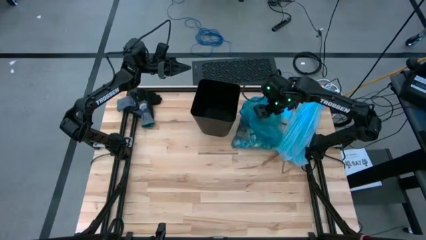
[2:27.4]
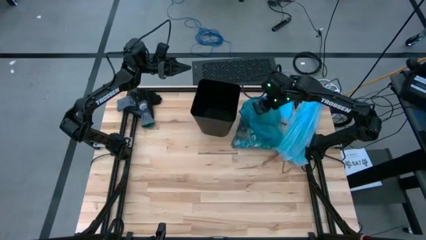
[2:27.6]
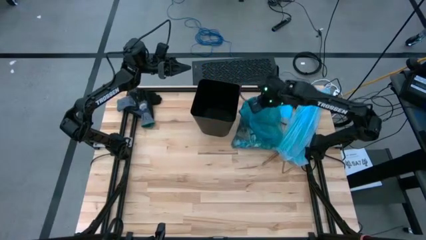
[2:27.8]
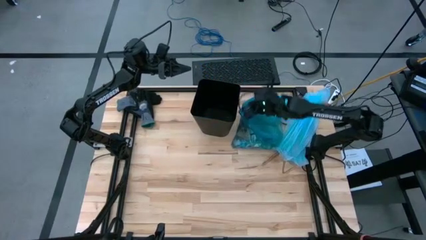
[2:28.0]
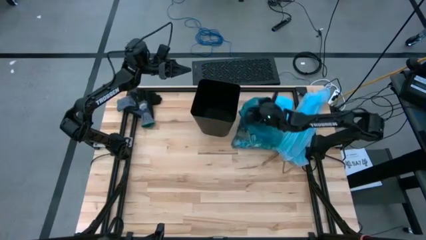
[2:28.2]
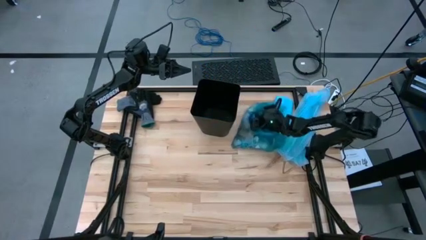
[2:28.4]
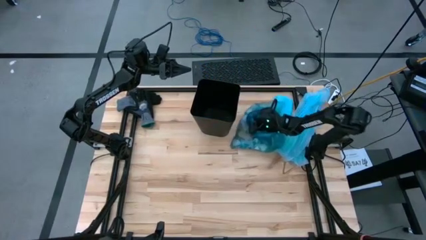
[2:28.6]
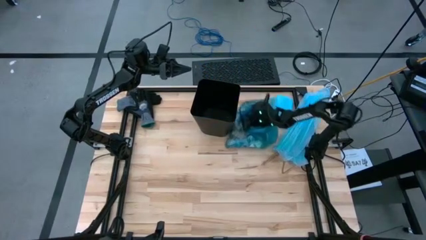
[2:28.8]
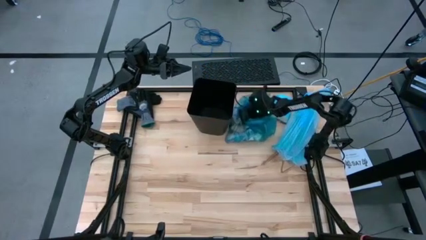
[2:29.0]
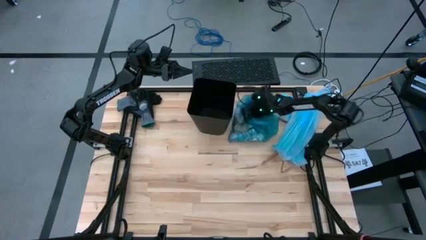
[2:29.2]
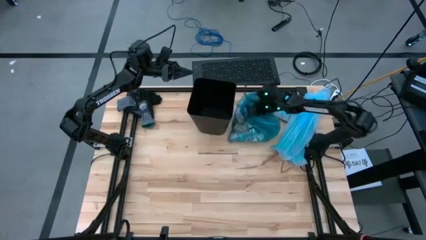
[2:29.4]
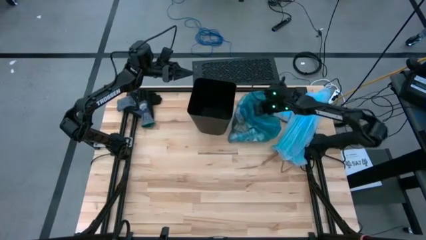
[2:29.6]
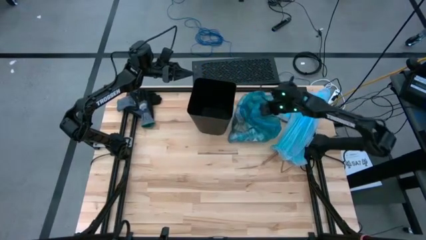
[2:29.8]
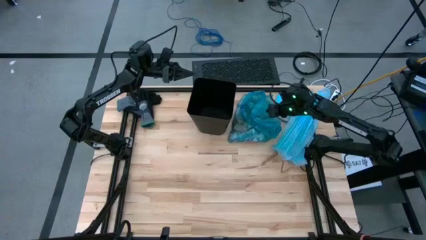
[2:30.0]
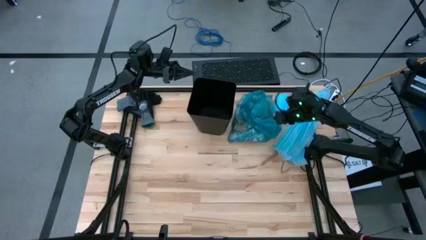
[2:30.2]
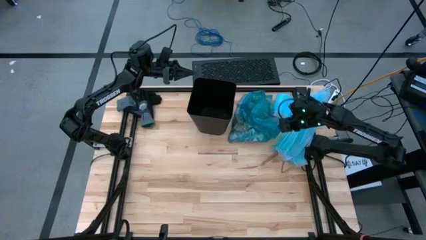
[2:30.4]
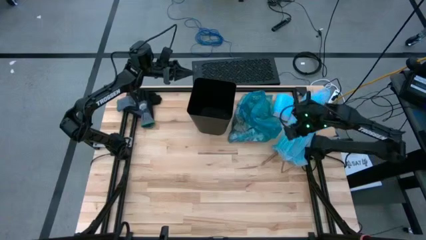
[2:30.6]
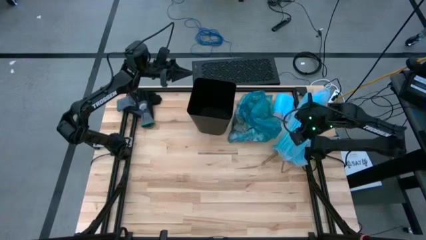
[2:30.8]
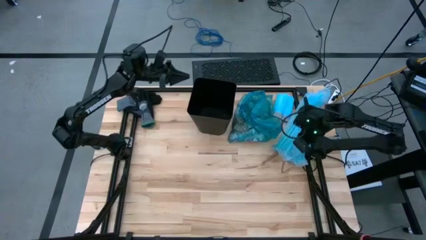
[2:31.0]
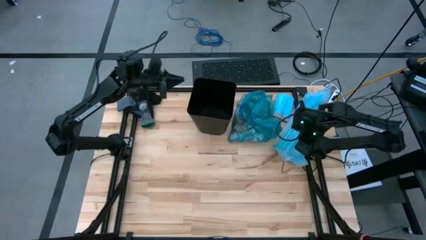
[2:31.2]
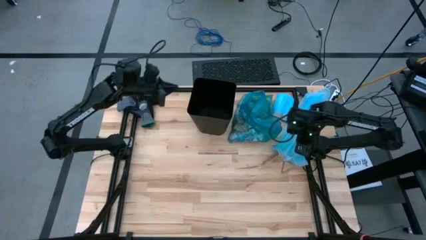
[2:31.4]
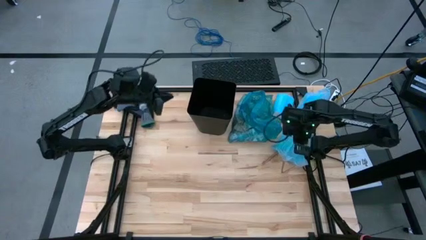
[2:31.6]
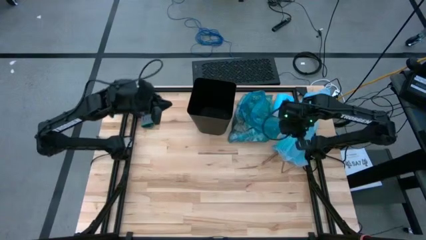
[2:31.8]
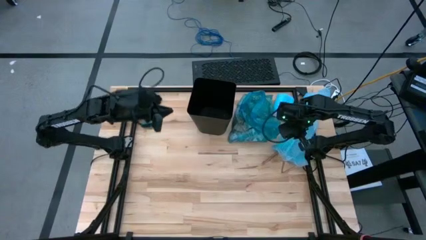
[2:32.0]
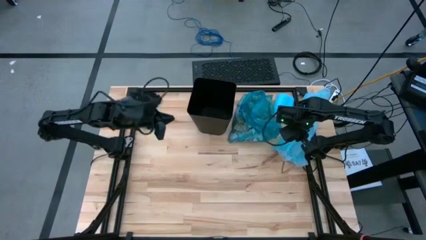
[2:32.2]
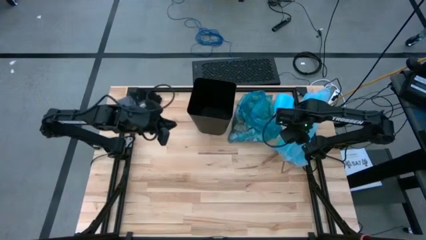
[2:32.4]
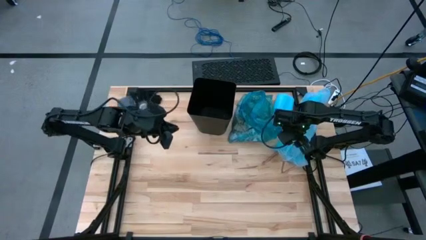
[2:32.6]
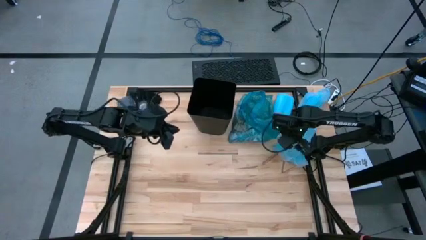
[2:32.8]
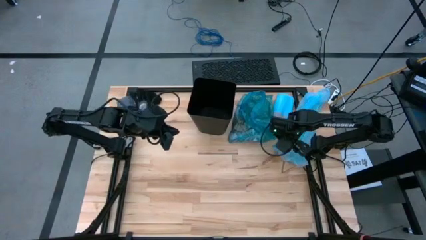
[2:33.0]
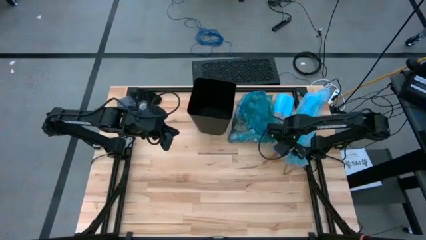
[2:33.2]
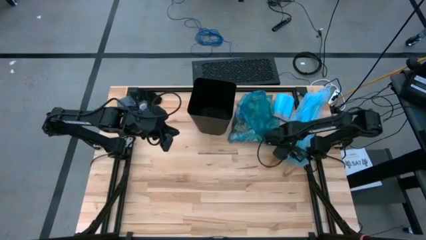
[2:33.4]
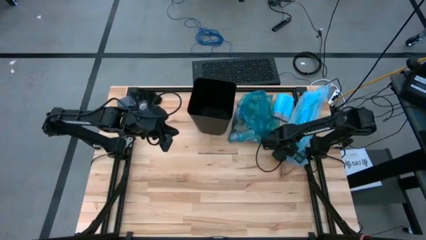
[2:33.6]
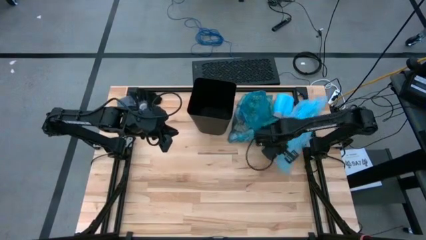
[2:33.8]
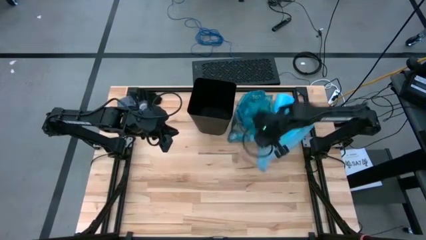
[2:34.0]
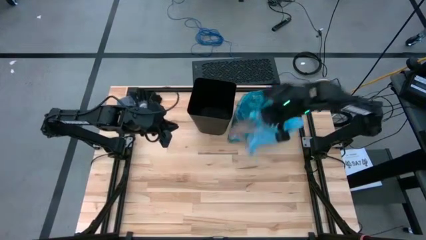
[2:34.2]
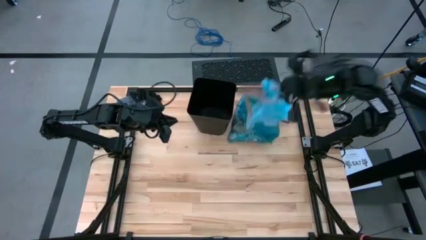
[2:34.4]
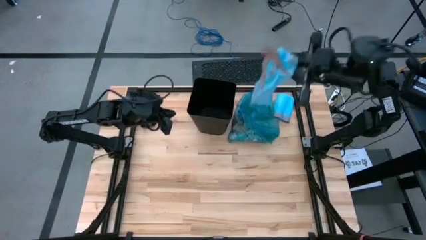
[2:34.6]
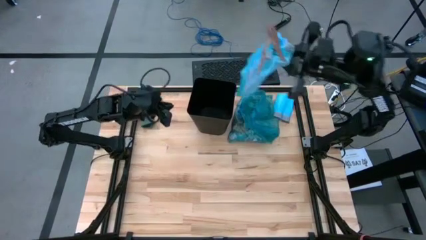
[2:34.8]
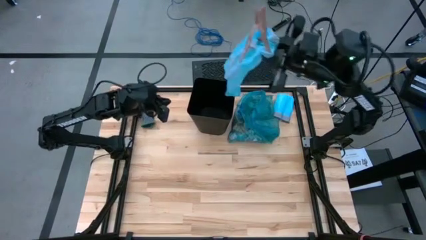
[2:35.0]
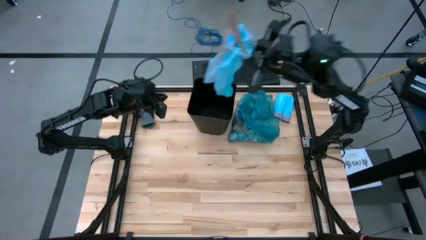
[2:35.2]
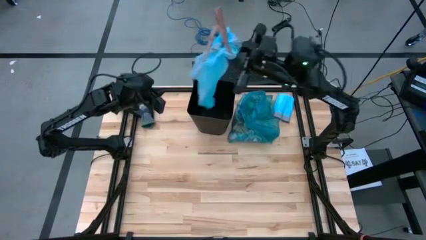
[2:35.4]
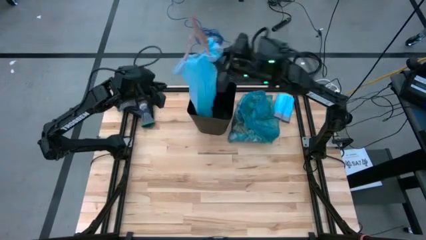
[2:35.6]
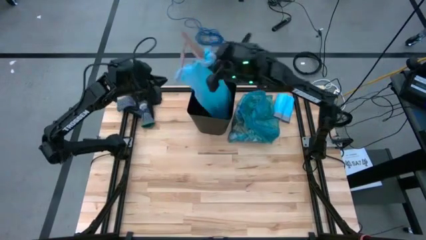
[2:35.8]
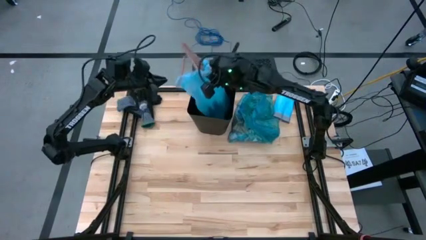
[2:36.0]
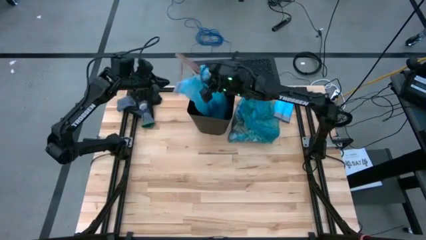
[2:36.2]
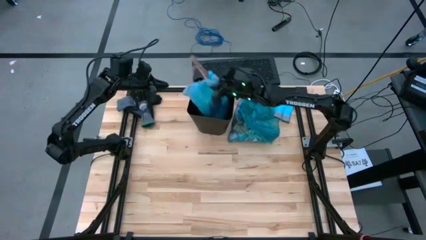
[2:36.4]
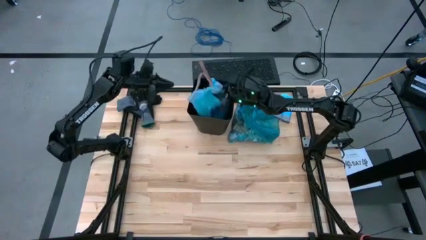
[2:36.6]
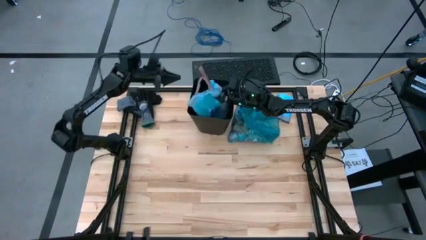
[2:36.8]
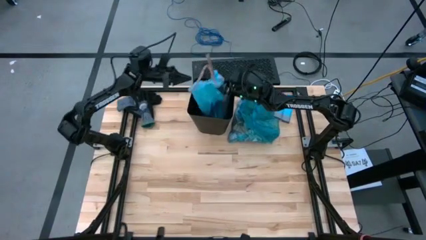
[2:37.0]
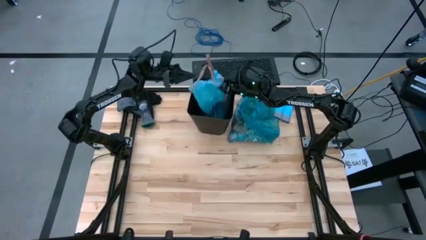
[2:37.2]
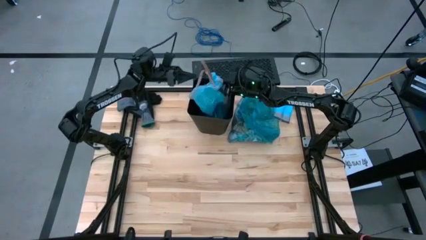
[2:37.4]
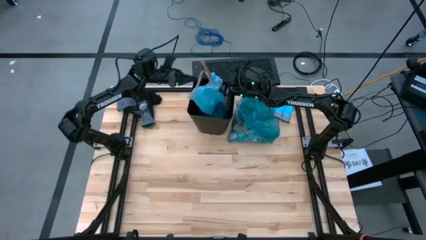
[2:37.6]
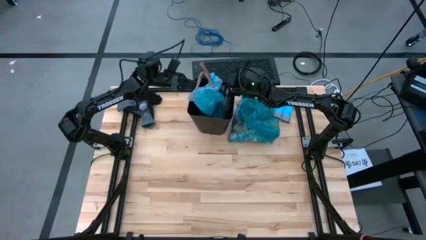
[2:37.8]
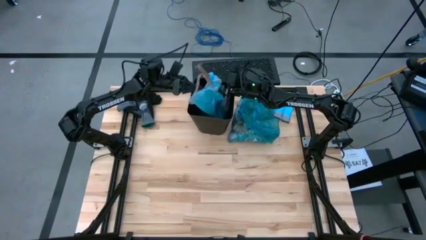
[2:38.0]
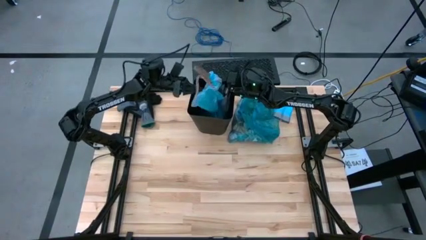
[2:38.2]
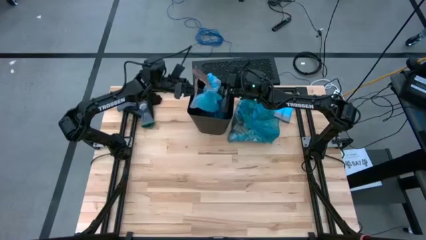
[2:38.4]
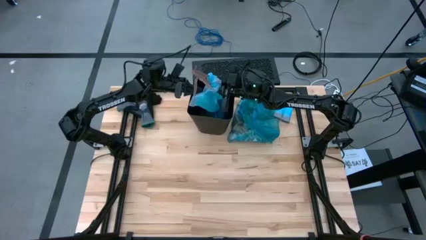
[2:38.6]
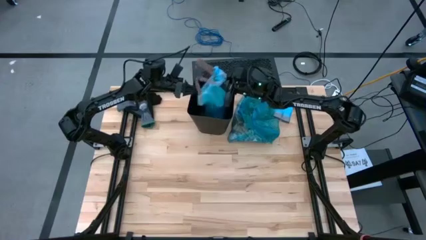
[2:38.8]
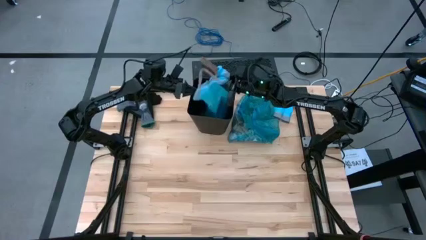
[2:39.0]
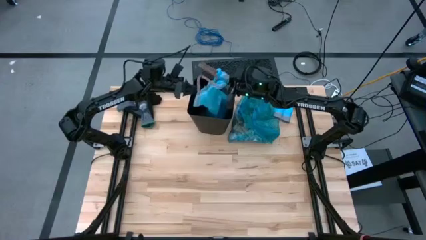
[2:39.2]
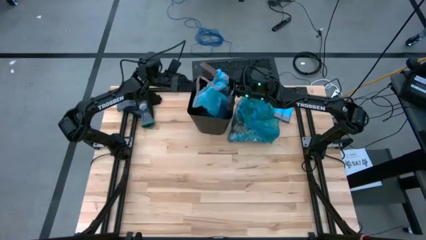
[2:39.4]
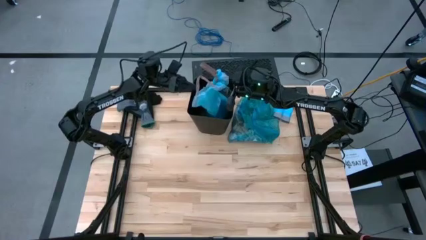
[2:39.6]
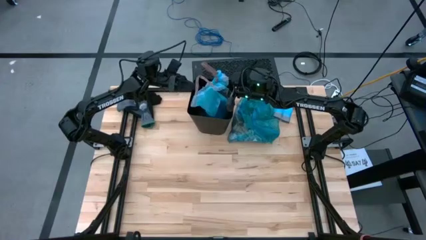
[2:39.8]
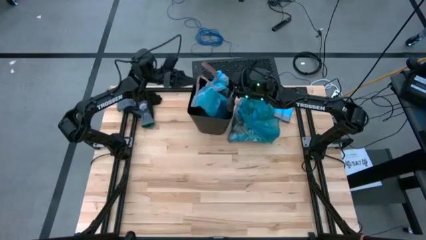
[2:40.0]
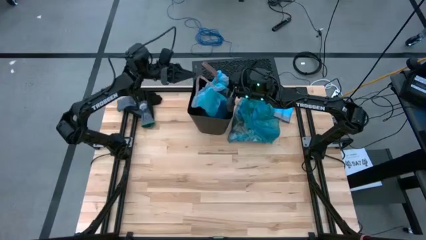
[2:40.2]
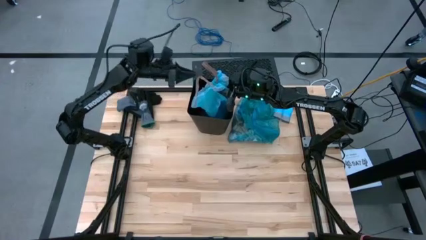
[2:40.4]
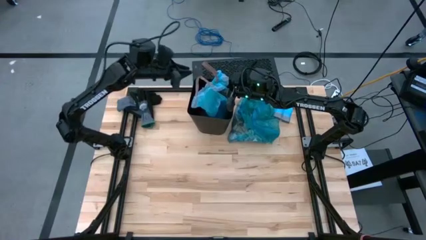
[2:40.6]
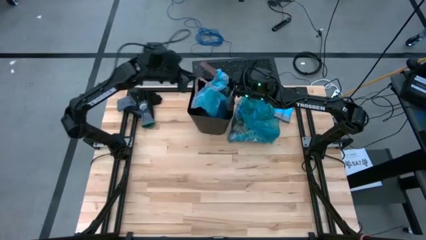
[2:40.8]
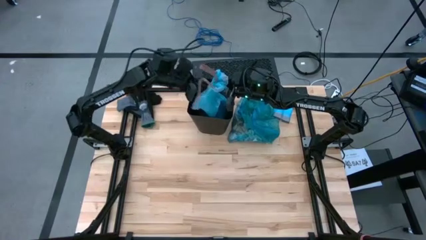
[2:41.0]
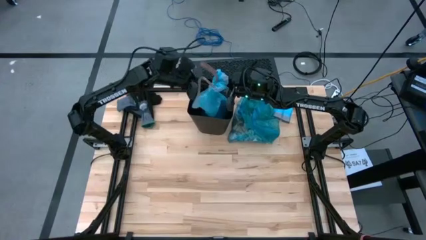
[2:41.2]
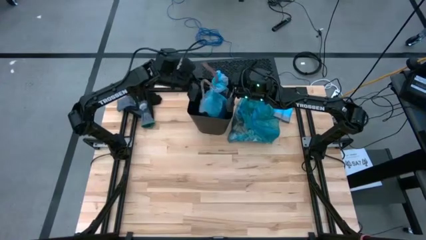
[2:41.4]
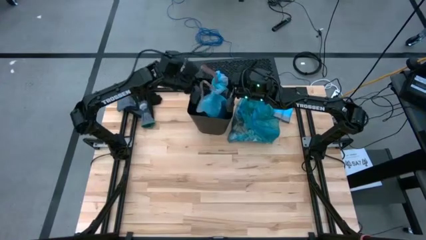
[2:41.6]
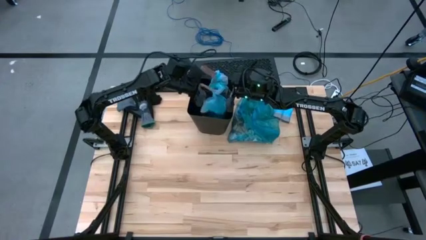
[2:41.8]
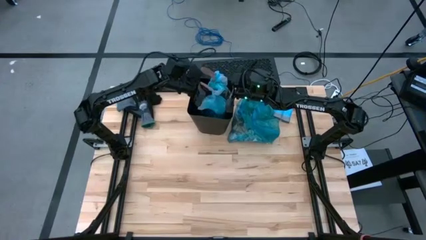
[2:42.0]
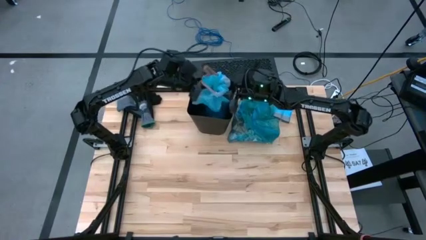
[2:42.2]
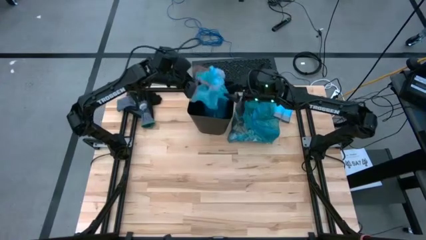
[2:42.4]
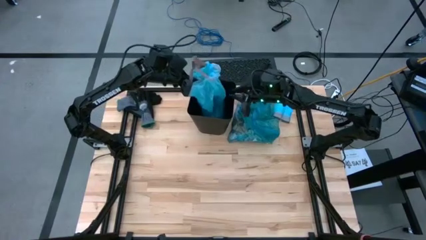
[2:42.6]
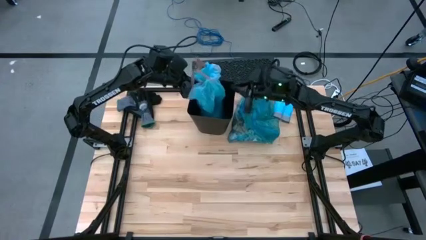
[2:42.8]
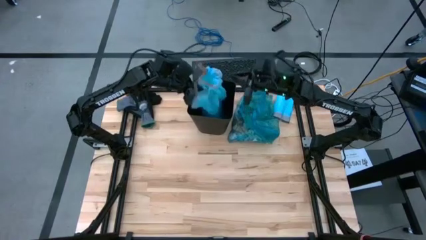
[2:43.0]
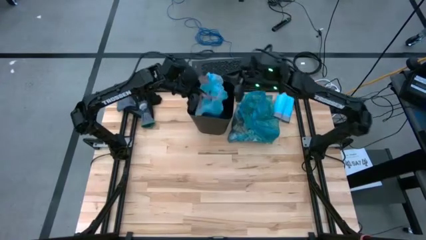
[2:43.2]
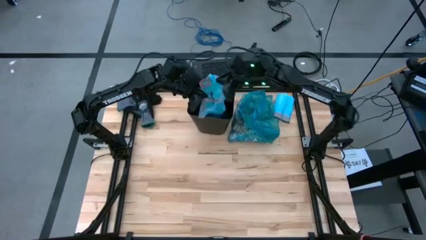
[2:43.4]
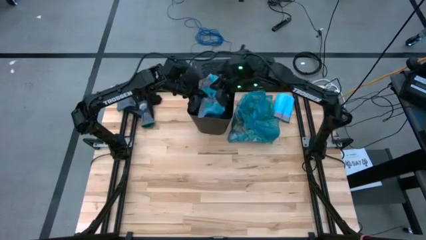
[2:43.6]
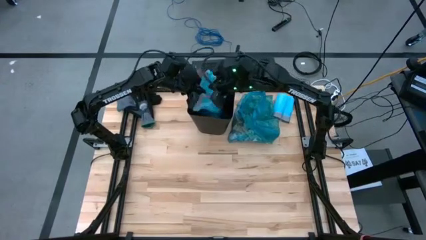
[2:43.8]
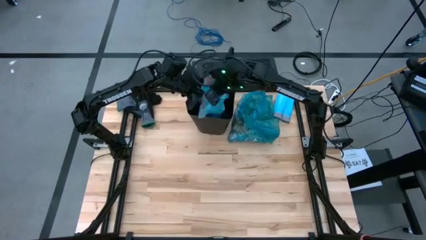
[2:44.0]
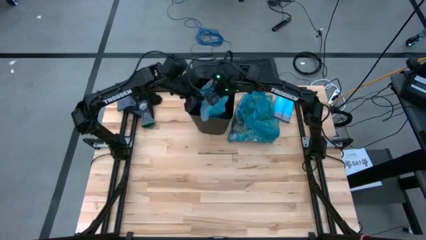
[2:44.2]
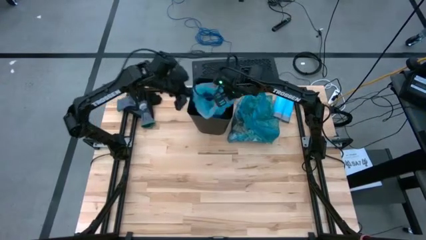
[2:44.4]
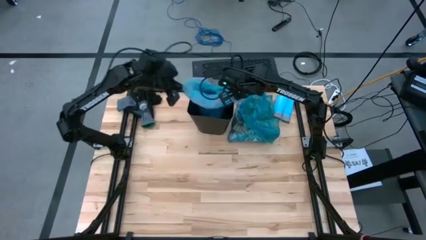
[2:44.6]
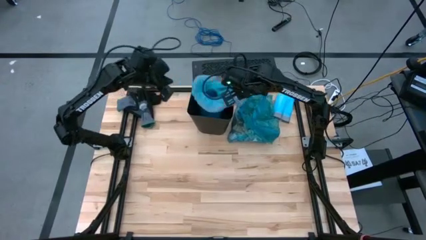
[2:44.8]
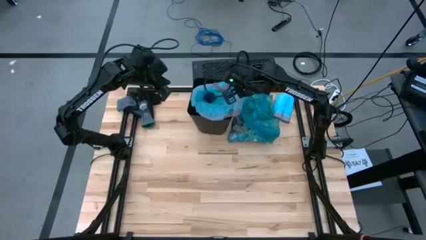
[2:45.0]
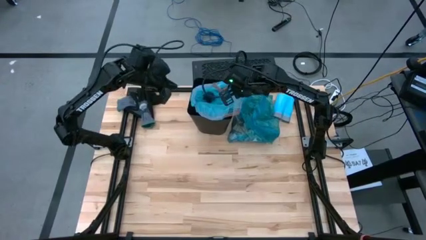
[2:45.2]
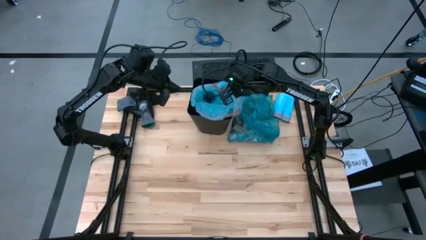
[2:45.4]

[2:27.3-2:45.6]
Task: place trash/remove bag and relplace
Insert the light blue trash bag into the bin
